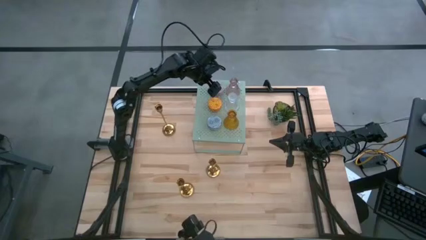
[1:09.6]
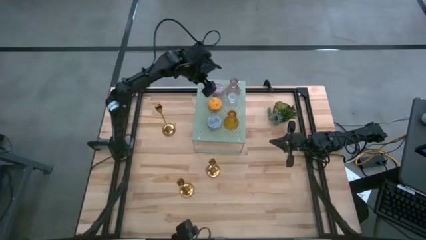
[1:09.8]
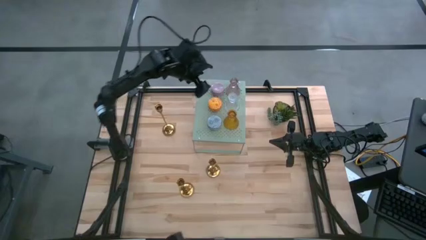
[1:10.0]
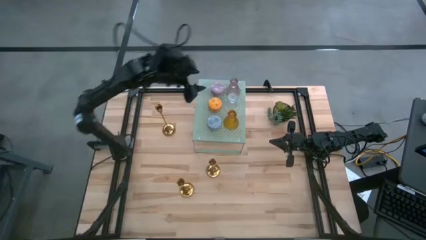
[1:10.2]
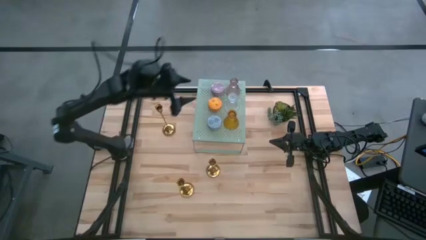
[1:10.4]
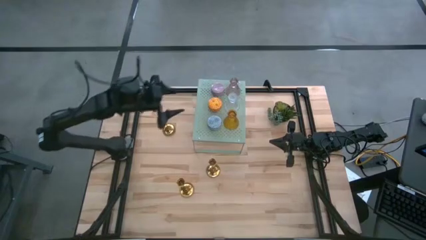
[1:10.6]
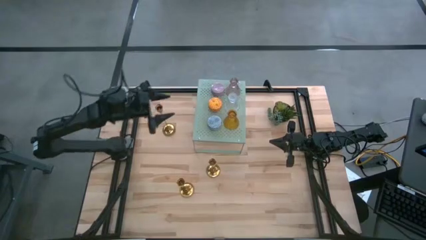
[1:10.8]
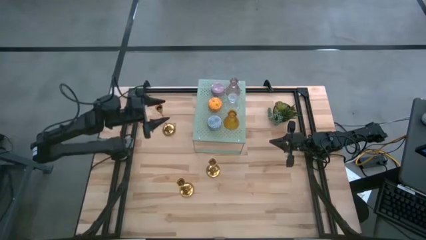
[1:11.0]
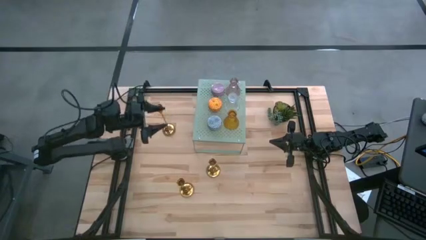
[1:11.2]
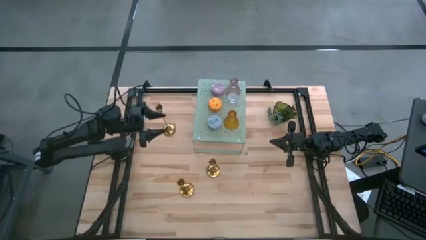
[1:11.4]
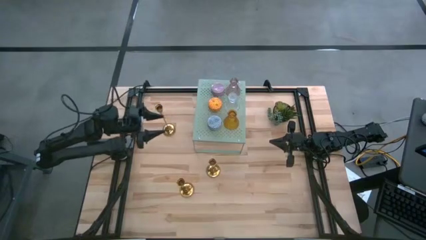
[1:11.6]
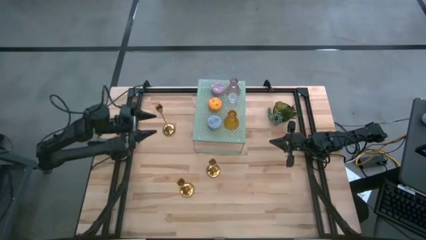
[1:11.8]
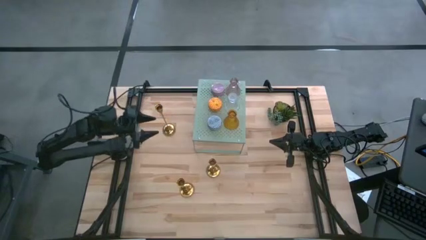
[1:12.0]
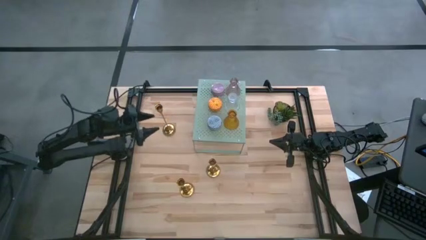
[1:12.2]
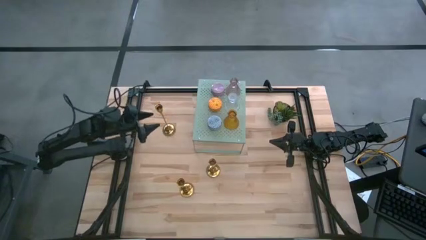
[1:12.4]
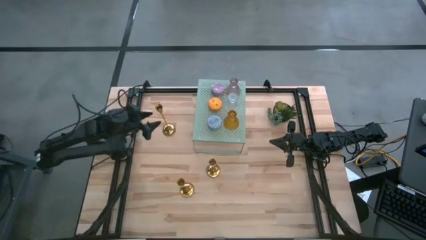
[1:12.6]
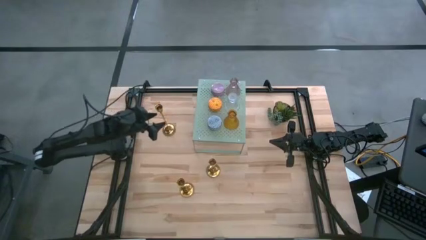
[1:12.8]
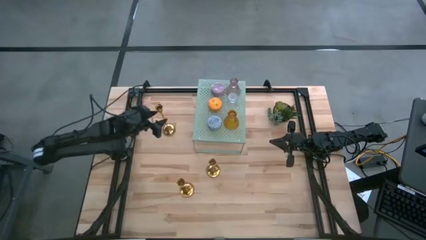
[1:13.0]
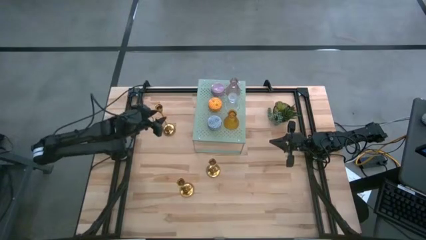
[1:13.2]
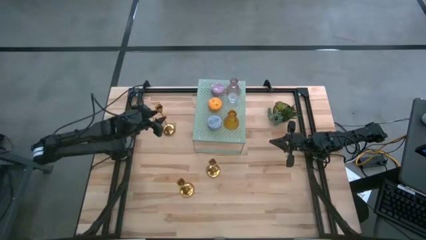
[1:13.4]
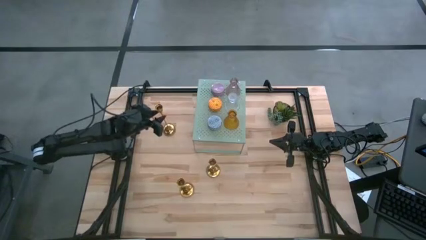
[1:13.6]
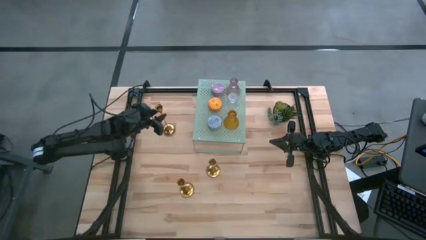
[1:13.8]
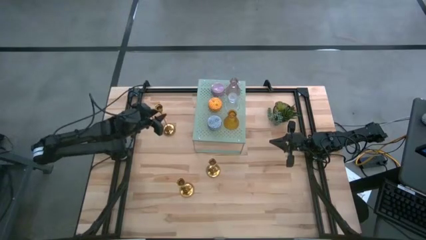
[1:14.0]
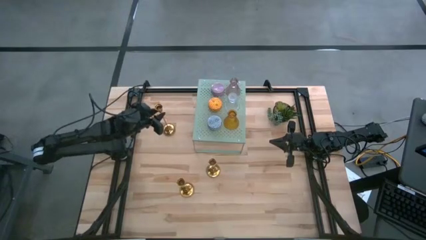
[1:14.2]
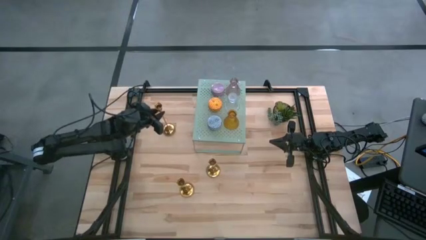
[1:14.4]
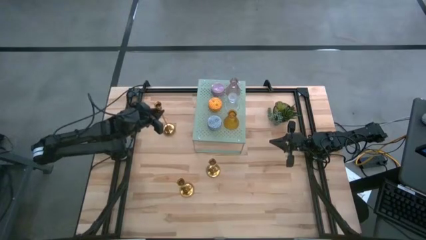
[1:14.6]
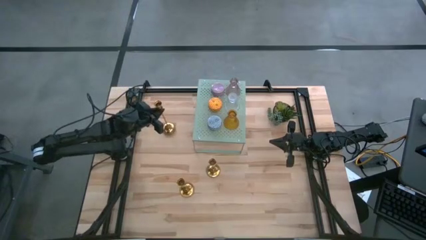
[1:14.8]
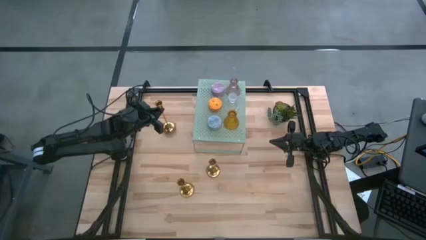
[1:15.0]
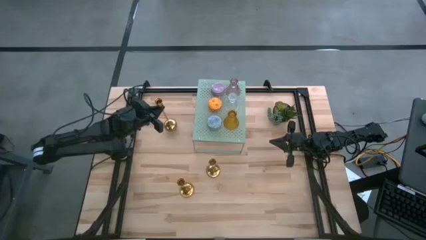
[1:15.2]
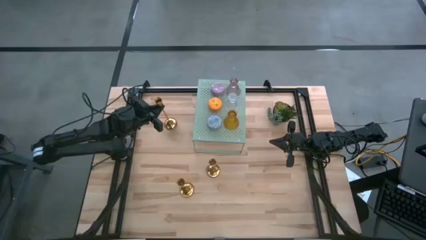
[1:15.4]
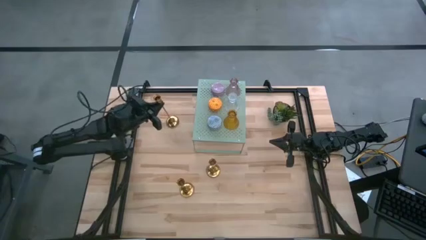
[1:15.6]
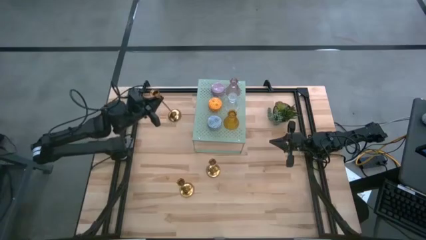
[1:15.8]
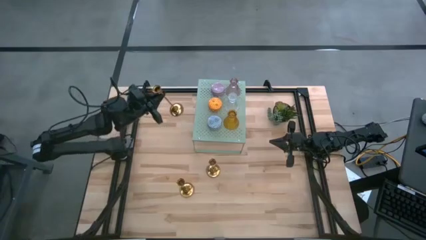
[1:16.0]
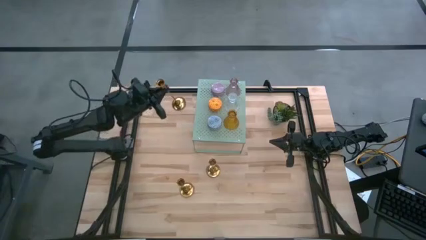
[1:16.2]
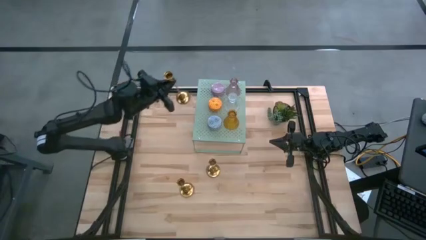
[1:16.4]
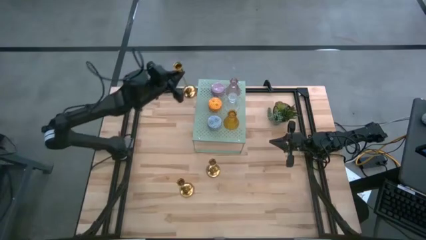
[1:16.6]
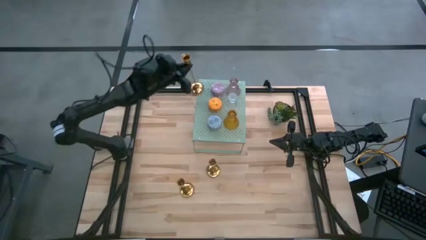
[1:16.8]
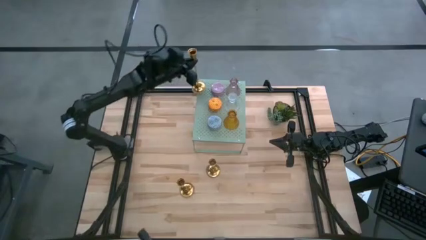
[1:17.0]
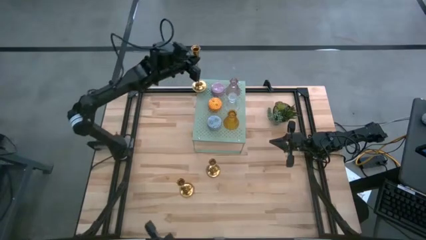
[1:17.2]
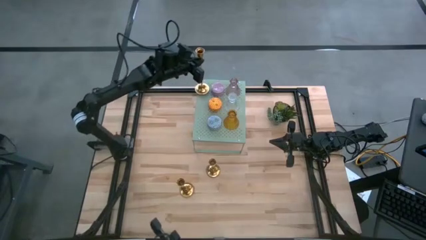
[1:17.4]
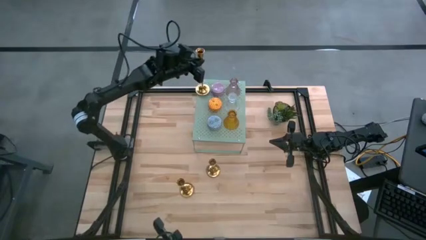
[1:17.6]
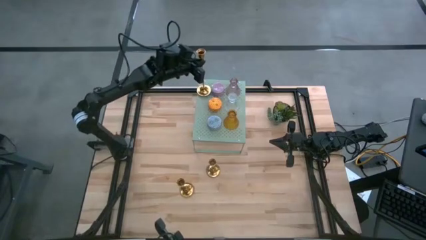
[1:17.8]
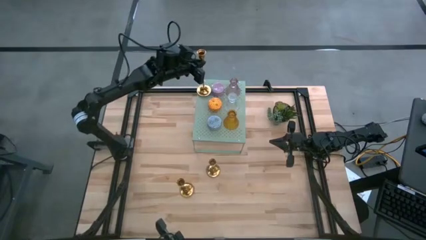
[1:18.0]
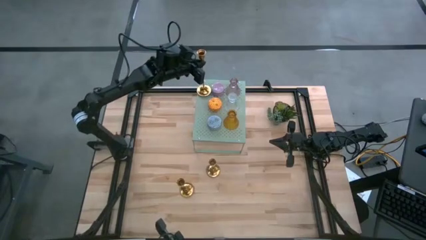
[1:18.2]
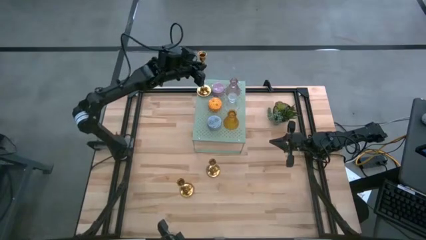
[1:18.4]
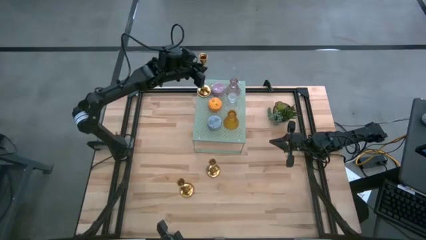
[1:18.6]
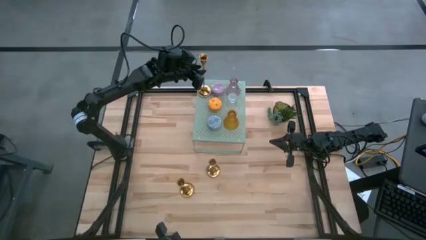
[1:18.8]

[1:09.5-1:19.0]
Task: Stock candles on shelf
Put the gold candle holder on the shelf

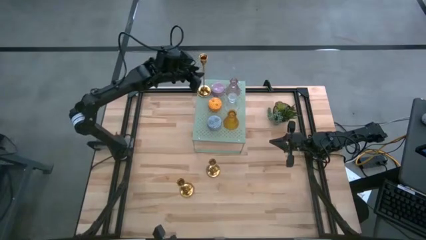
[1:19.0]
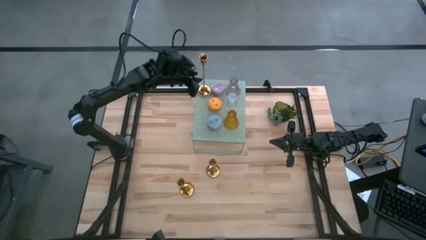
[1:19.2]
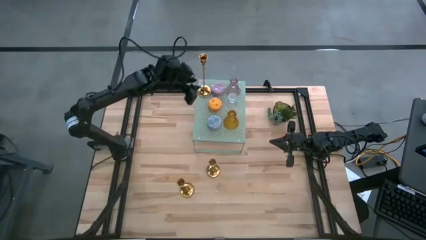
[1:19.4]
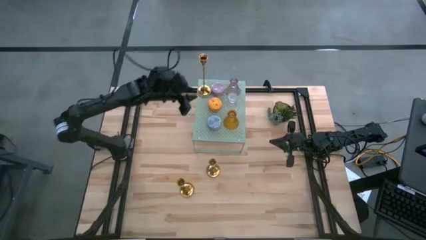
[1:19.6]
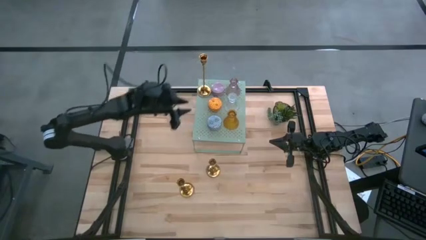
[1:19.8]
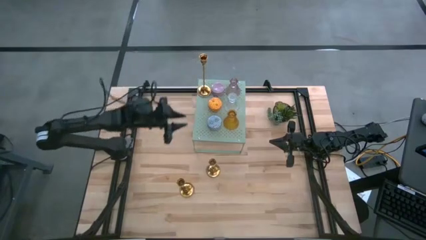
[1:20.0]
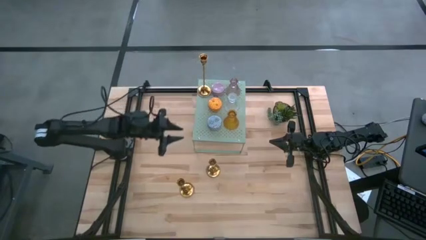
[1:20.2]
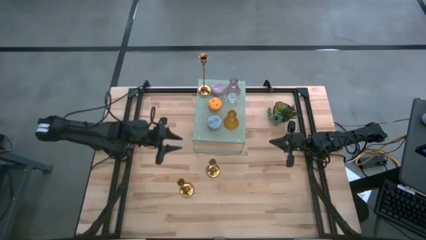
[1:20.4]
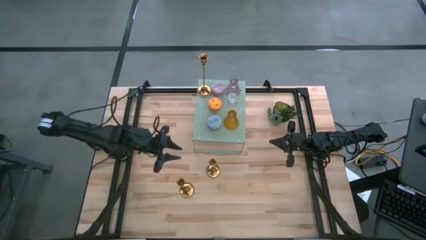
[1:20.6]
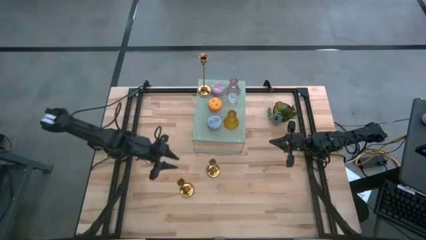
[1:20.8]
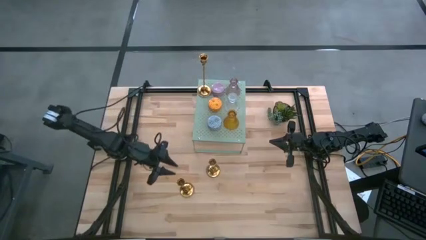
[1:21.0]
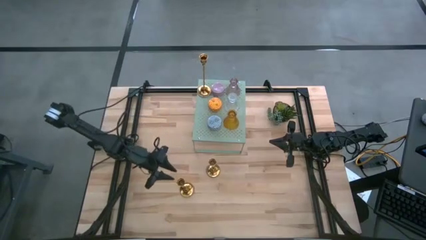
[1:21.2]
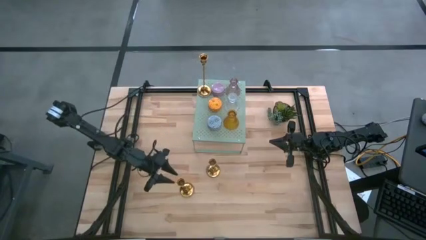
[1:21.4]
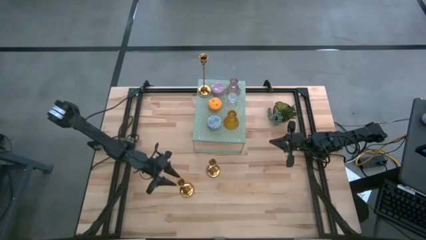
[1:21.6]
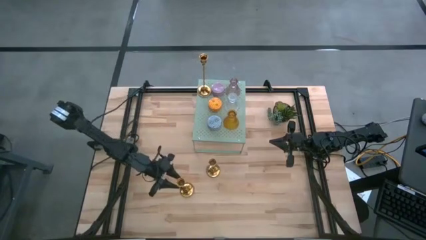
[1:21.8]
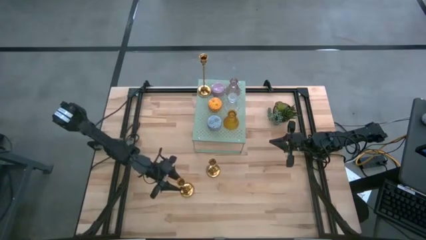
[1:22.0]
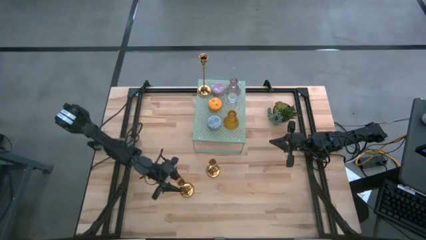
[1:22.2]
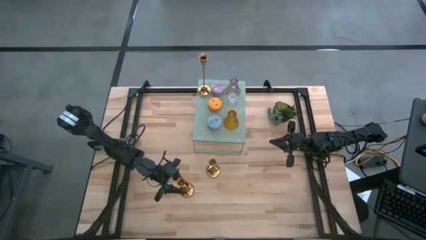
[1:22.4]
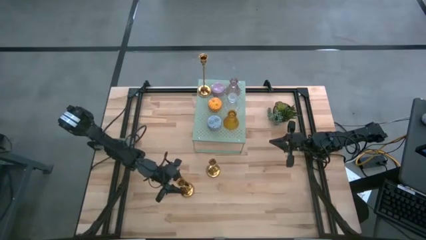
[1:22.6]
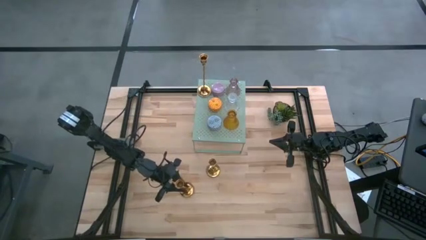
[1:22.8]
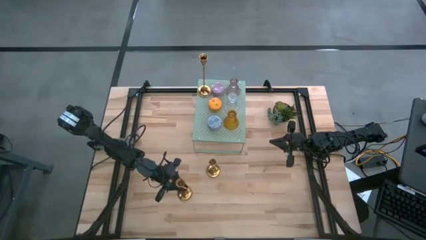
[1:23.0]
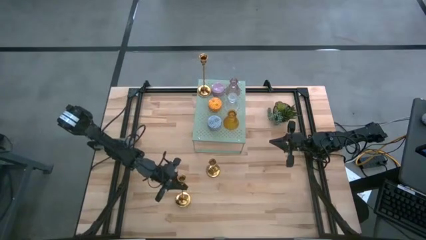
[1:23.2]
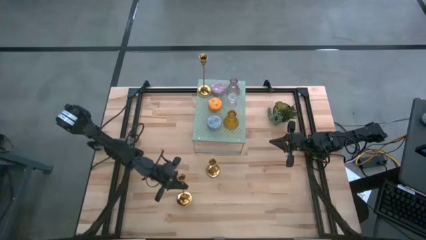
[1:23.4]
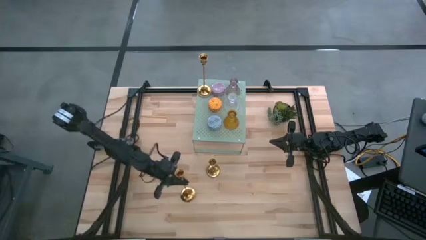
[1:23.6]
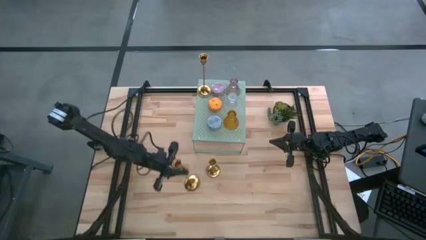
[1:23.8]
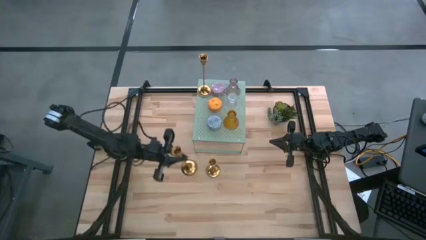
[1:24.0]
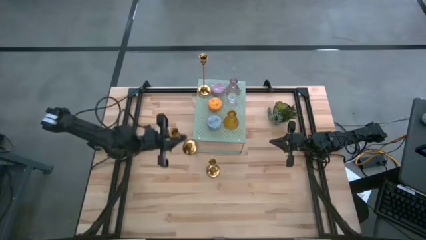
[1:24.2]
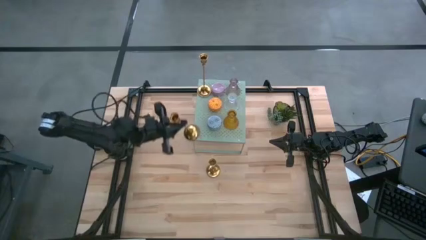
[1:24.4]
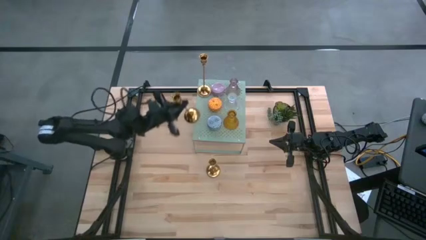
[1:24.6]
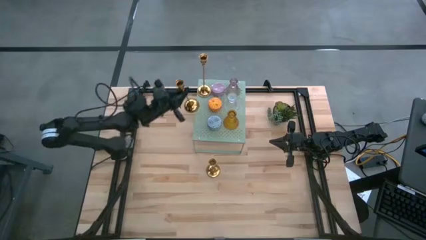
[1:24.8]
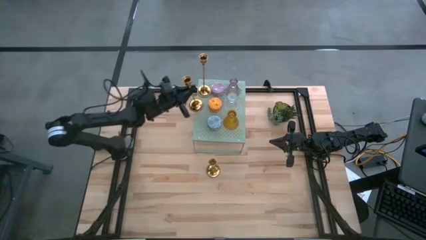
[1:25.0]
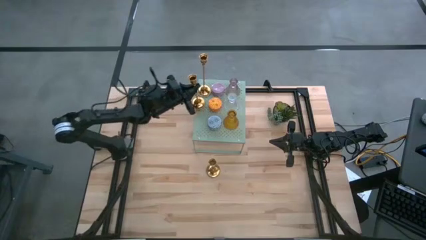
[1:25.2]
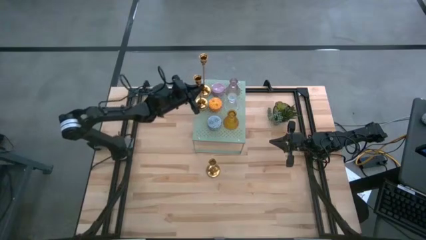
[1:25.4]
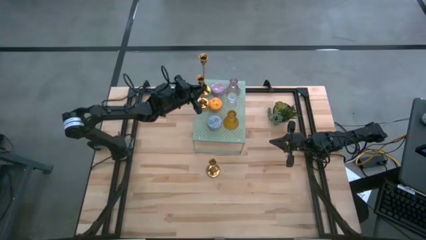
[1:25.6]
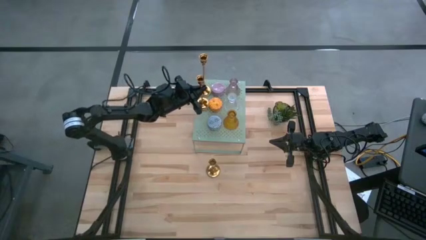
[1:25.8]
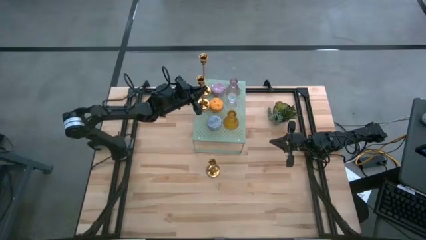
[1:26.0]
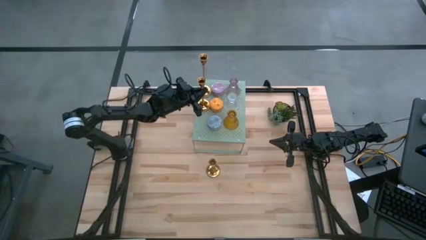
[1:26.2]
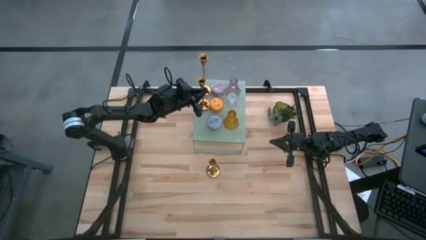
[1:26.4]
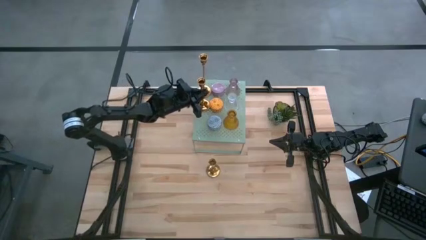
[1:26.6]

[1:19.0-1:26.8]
Put the gold candle holder and aligned it with the other gold candle holder on the shelf
